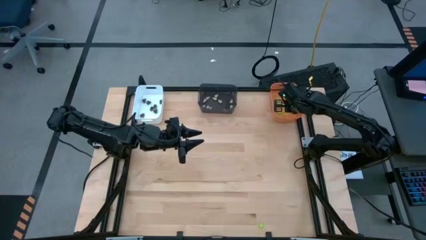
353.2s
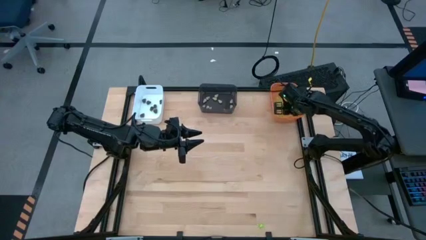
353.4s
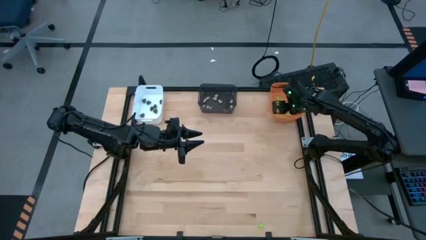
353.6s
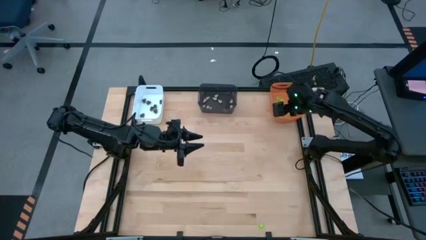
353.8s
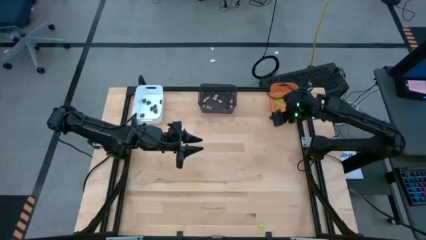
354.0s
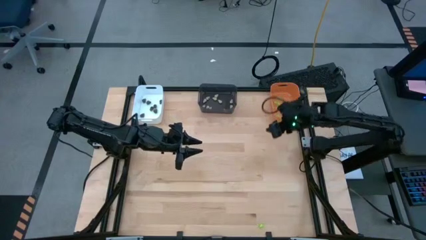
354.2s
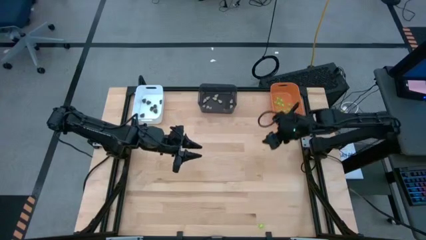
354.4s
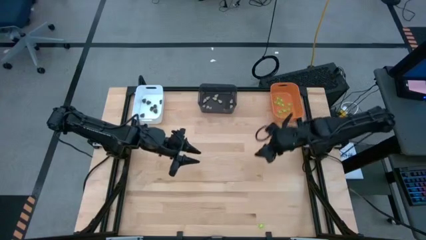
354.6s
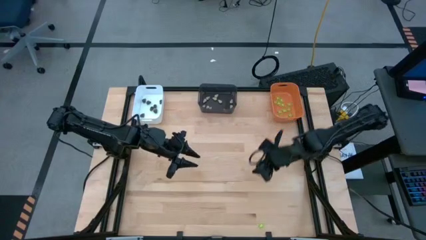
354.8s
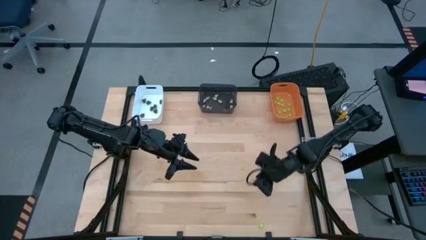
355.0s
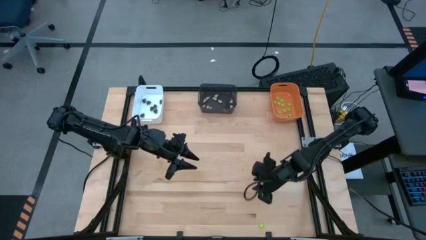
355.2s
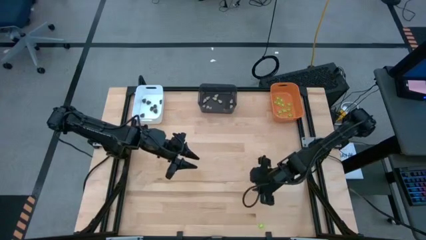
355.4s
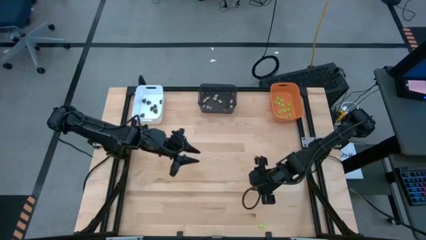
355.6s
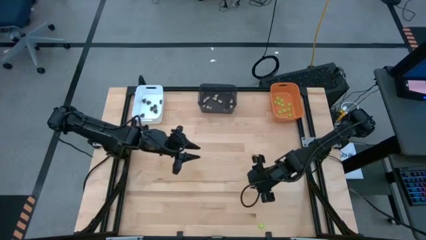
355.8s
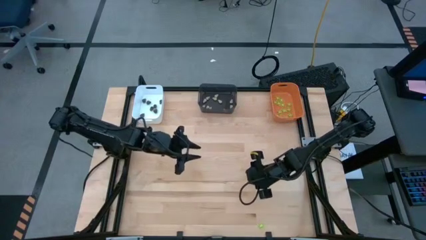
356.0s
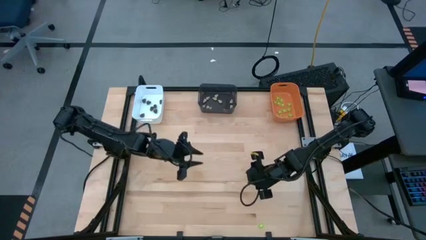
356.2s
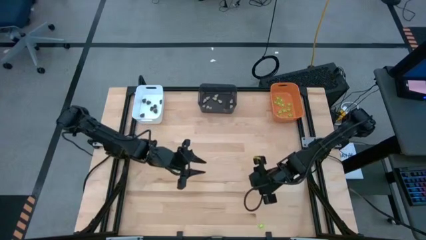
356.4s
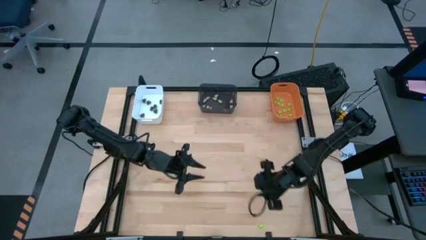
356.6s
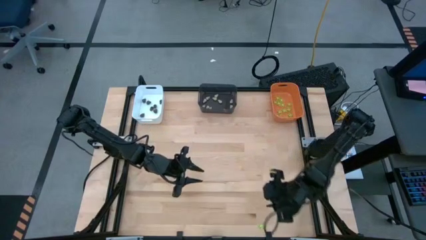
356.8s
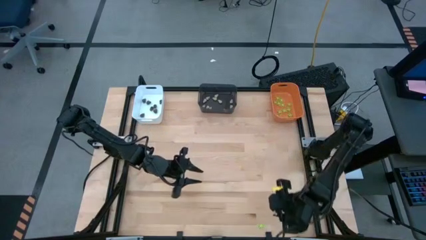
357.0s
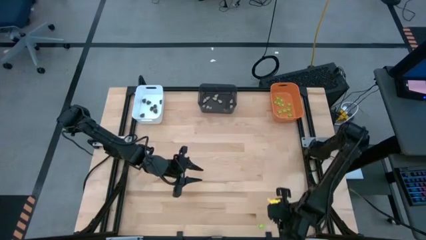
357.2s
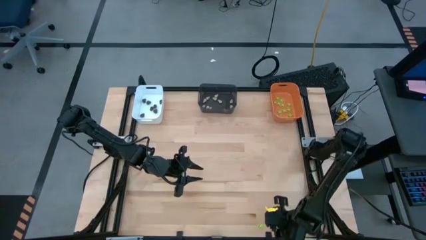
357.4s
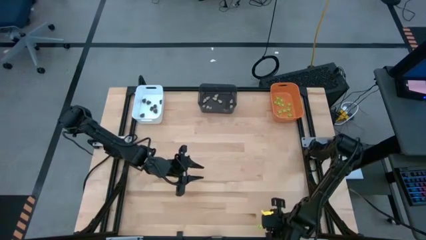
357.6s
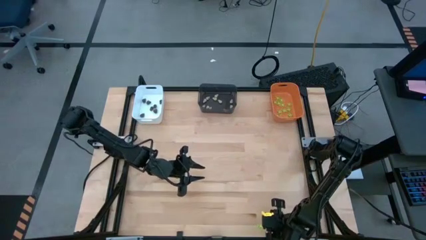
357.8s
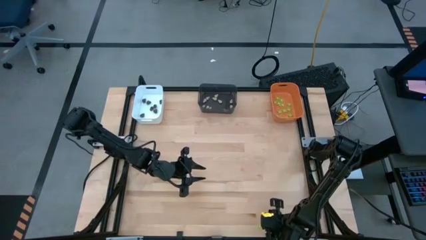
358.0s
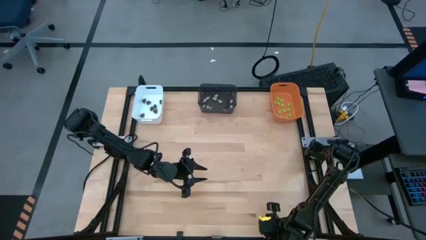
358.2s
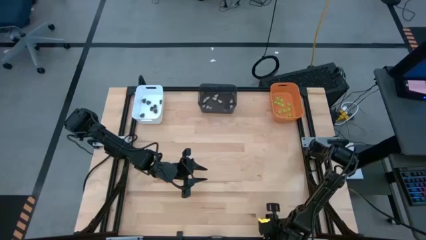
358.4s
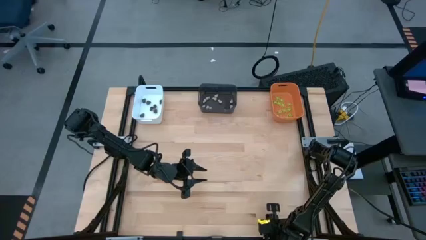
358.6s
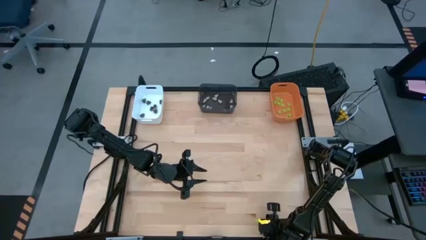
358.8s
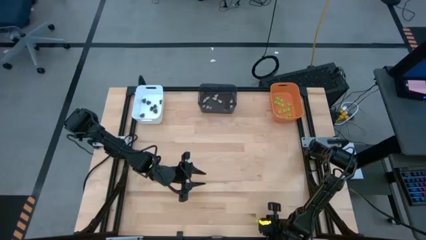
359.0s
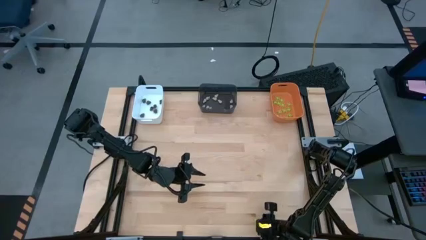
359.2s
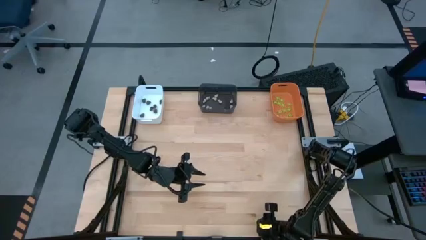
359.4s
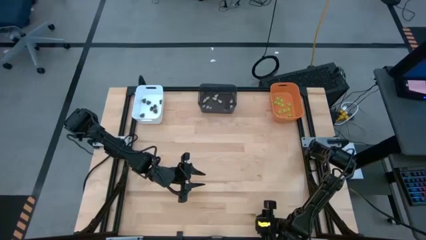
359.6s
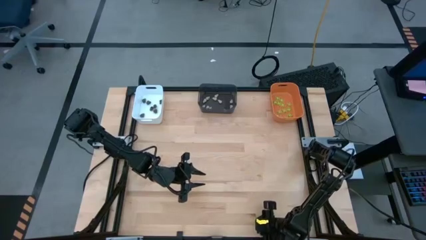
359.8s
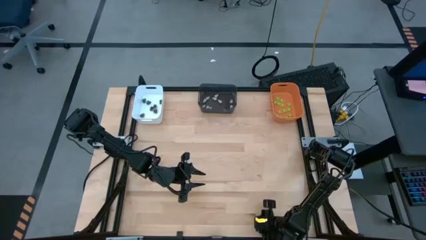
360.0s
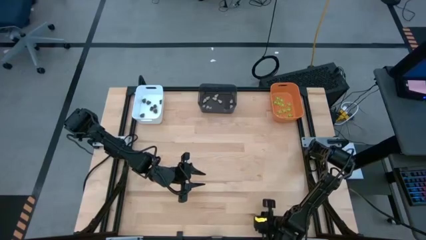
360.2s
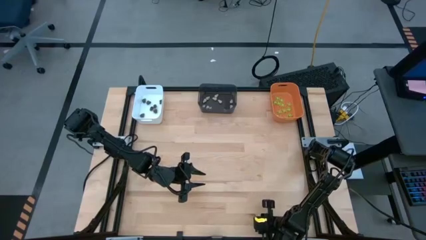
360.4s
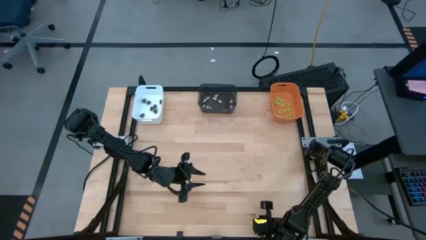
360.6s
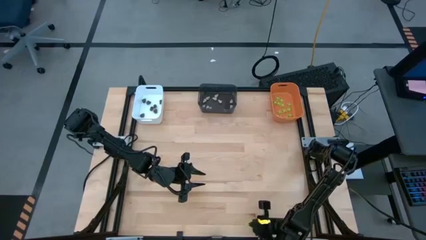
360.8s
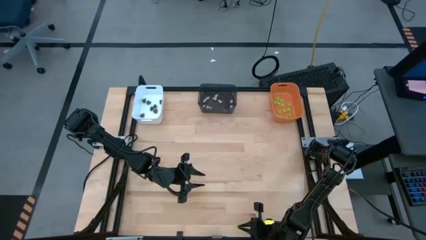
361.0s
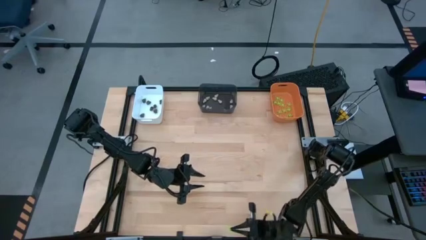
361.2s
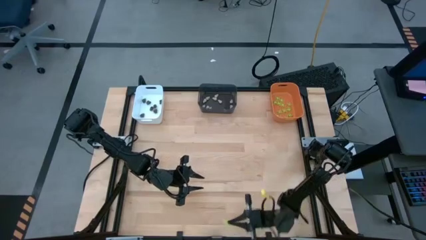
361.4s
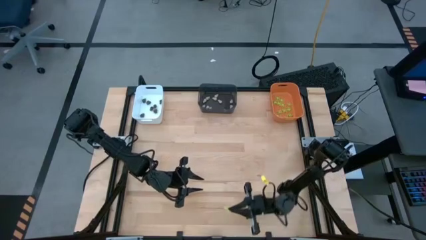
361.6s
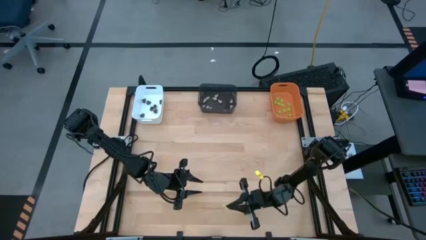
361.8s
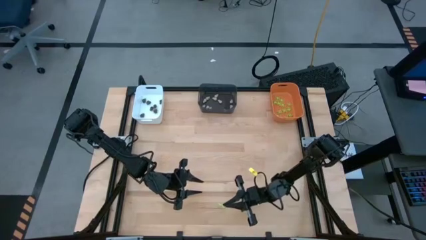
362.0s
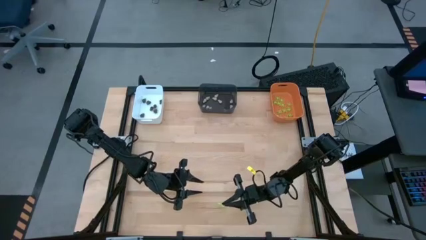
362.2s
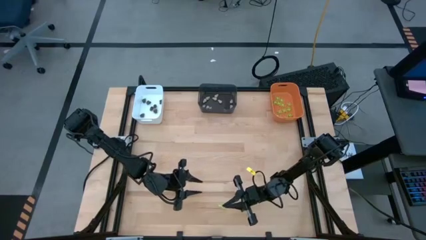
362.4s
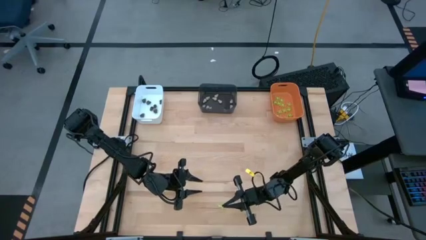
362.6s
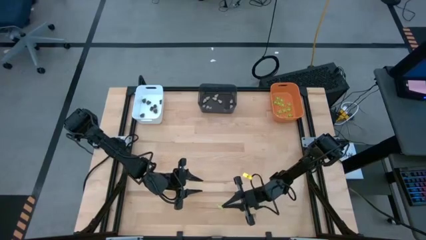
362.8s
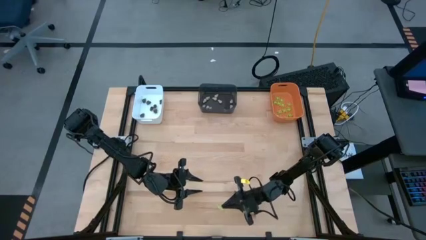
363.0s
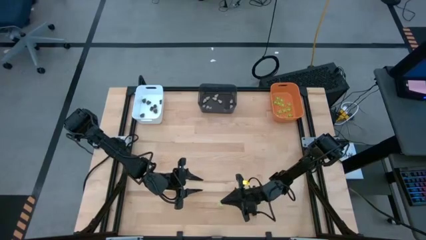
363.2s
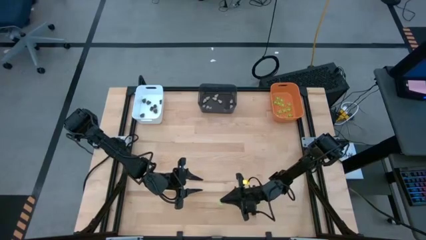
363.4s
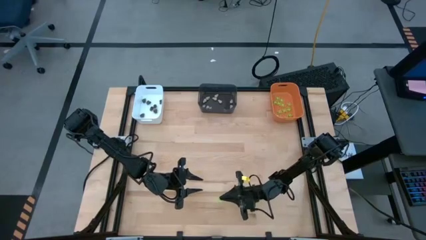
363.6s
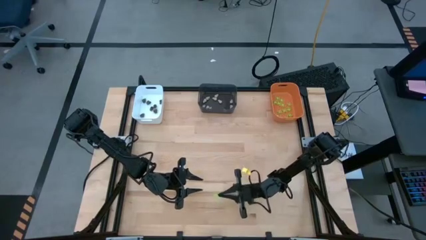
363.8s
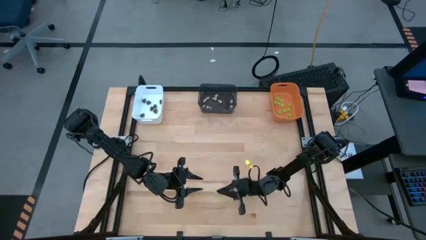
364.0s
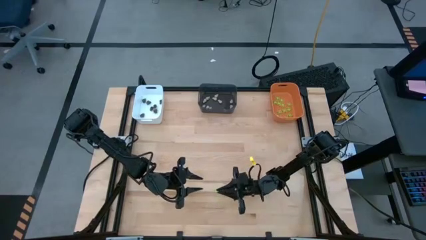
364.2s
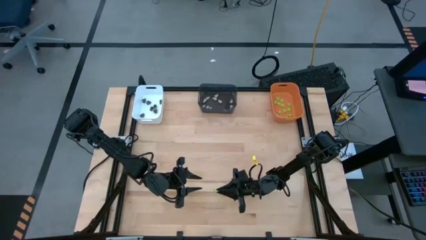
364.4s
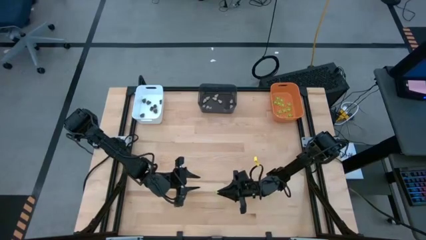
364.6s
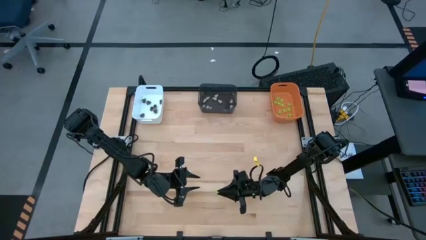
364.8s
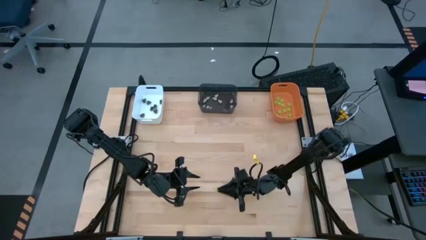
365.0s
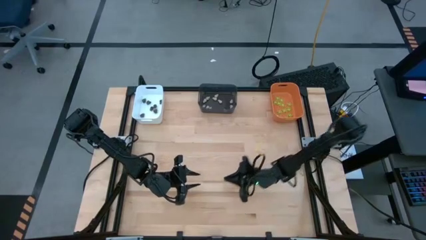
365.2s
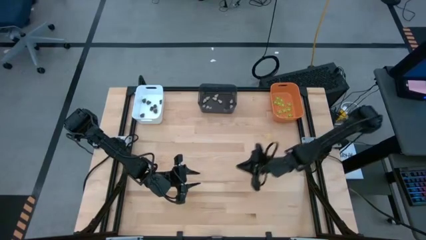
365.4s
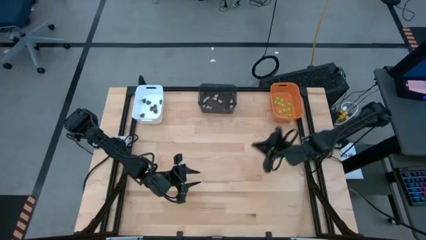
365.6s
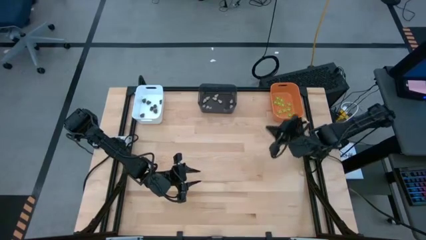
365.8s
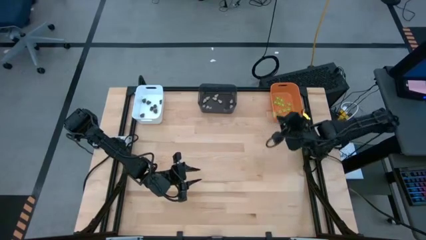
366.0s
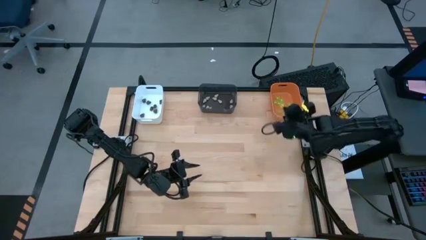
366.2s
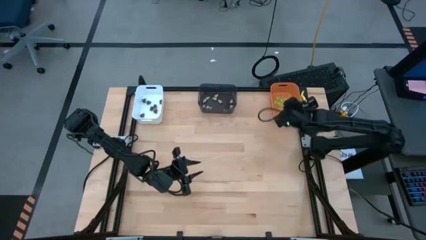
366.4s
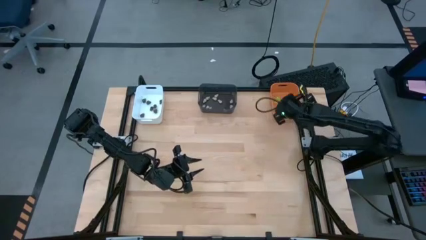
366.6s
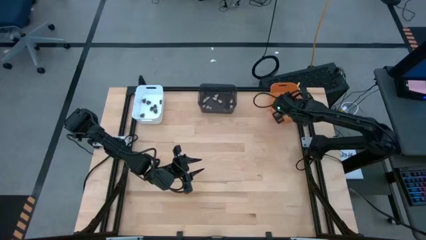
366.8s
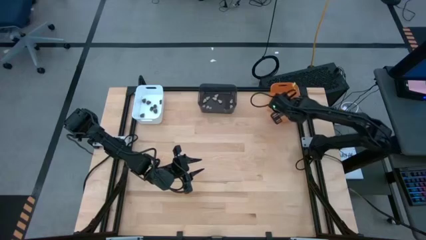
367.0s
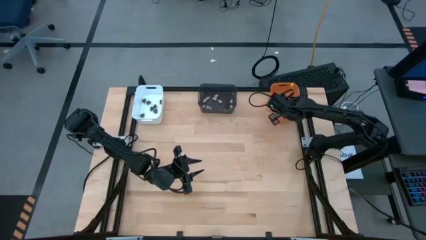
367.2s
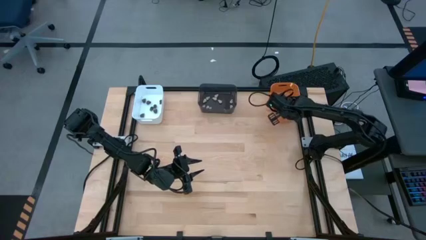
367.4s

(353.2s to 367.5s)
Task: Sort Halloween decoration
Put the green toy spider into the orange bin

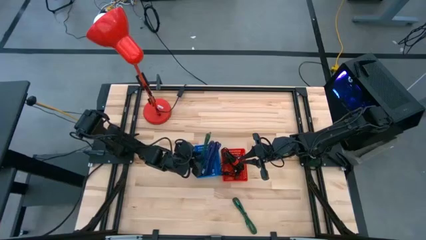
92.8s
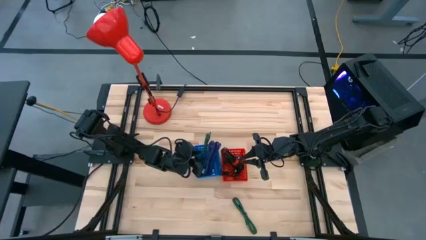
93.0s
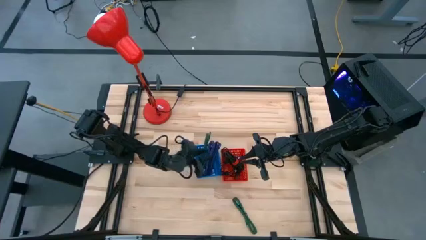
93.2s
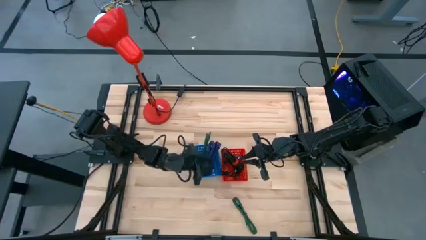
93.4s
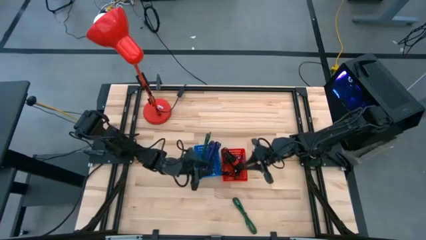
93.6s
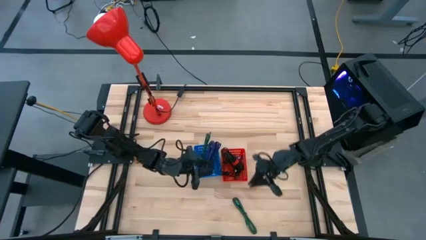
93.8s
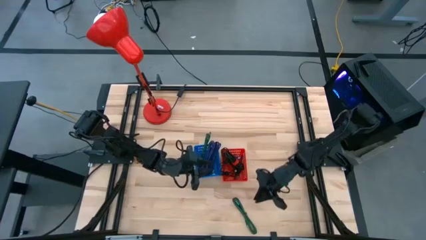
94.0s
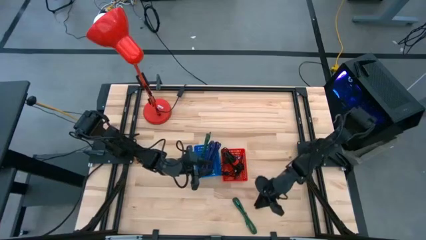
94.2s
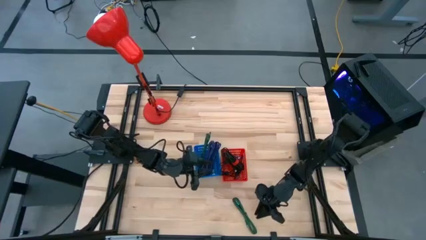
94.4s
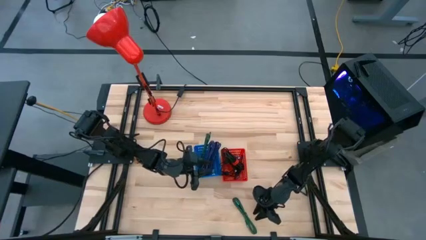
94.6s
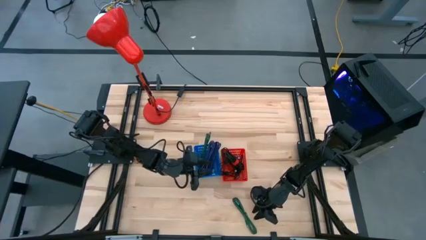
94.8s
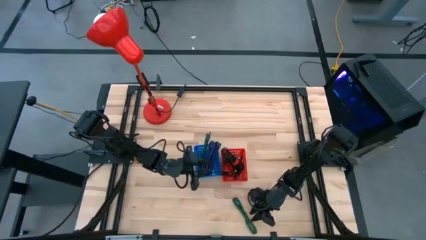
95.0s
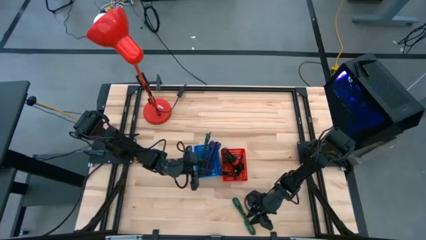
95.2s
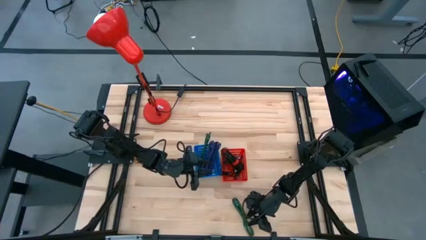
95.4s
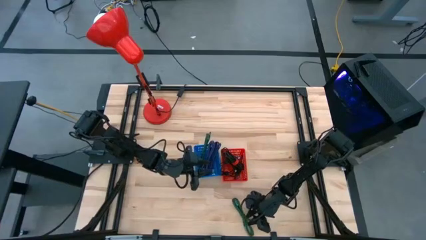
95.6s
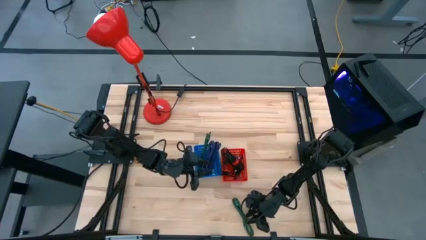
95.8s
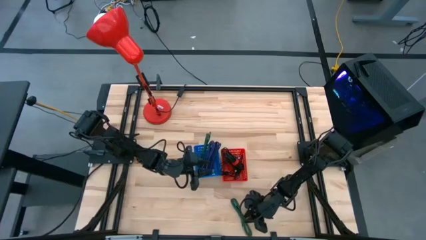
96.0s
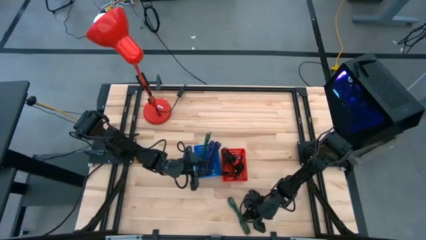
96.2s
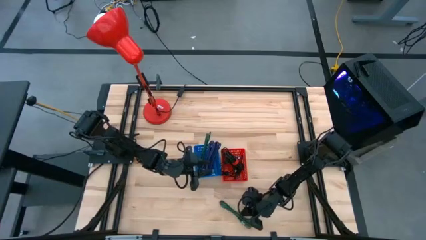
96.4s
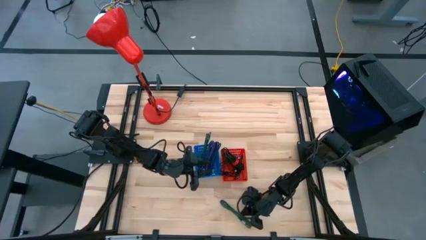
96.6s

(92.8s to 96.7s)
Task: Pick & Place USB Port
Put the green charger cable into the blue bin
